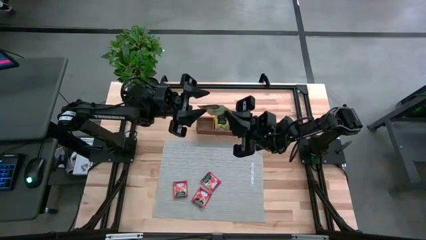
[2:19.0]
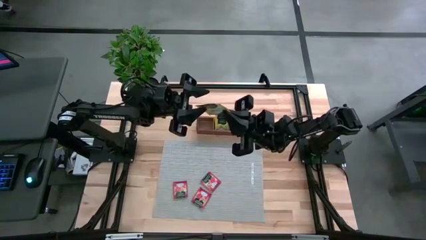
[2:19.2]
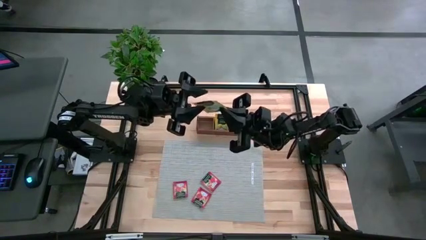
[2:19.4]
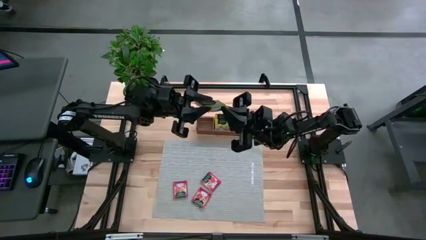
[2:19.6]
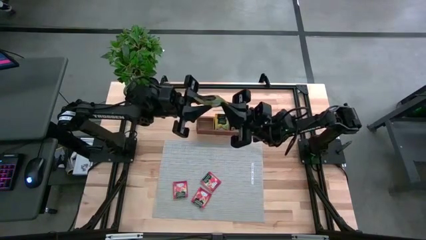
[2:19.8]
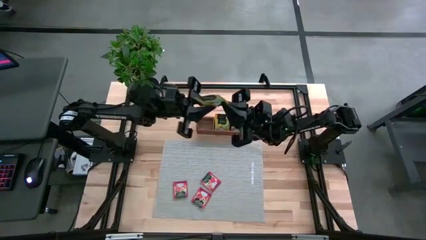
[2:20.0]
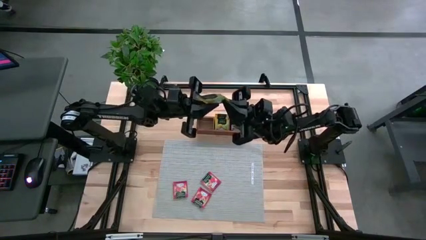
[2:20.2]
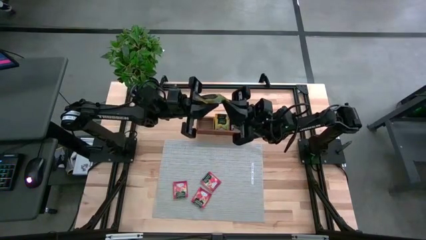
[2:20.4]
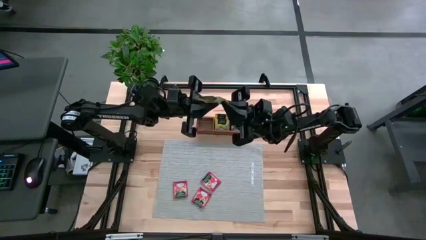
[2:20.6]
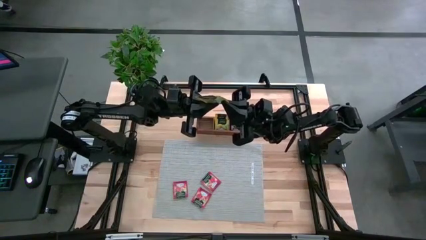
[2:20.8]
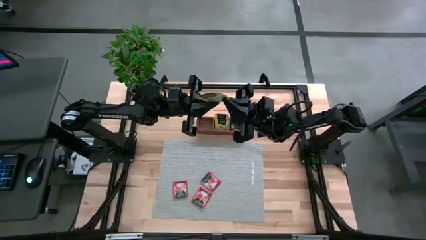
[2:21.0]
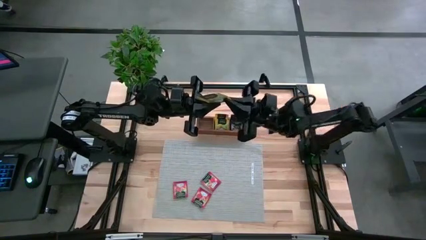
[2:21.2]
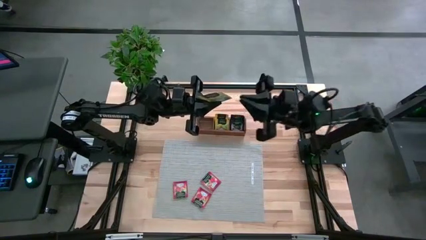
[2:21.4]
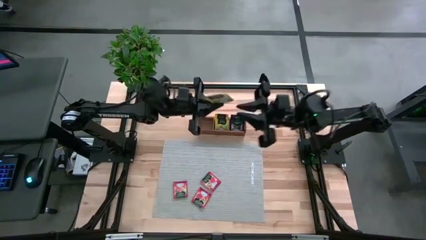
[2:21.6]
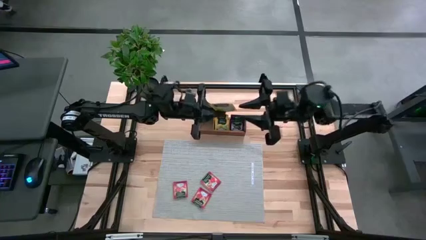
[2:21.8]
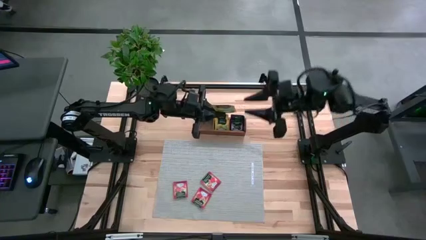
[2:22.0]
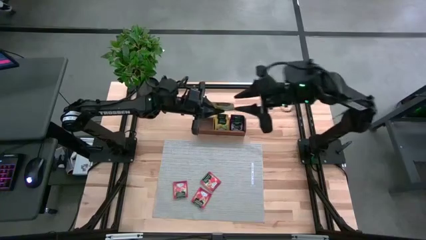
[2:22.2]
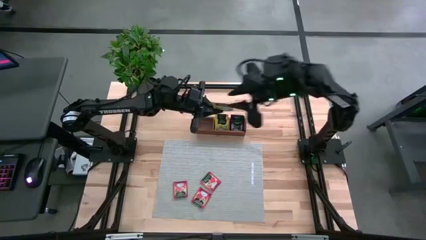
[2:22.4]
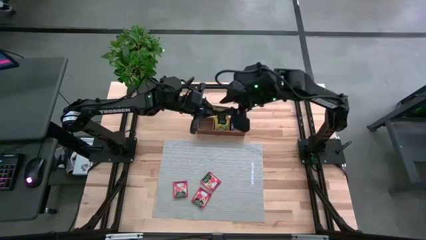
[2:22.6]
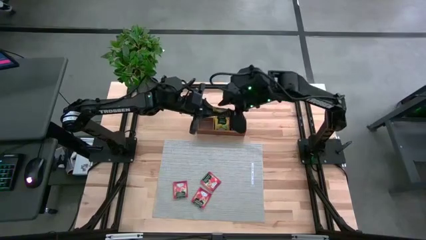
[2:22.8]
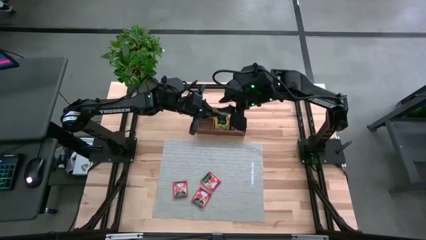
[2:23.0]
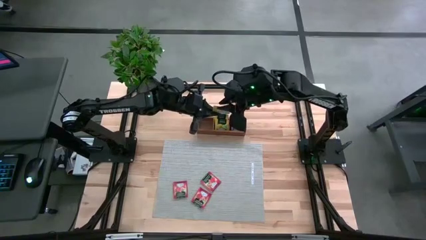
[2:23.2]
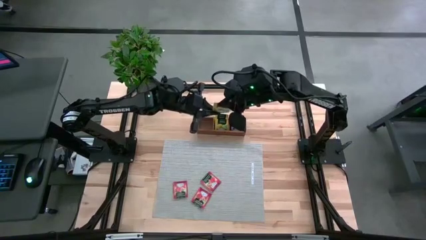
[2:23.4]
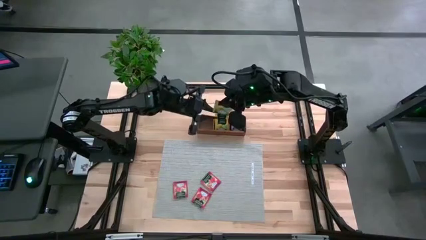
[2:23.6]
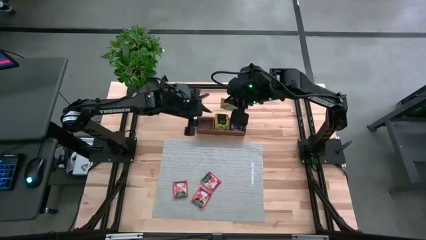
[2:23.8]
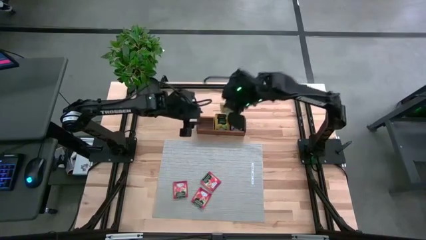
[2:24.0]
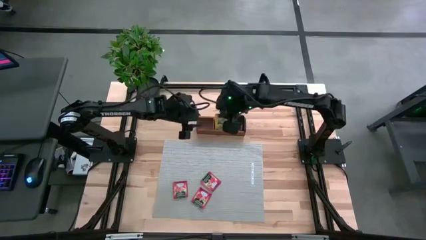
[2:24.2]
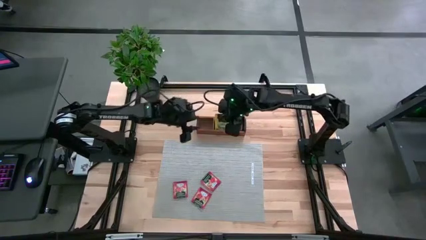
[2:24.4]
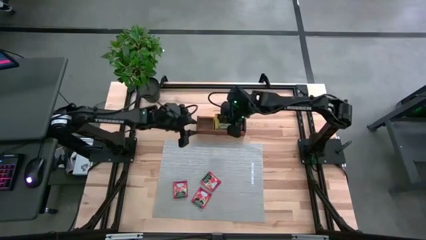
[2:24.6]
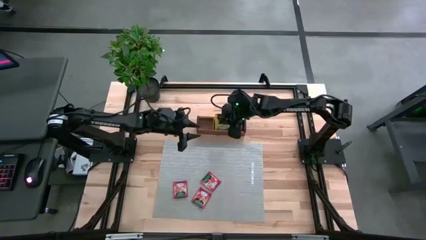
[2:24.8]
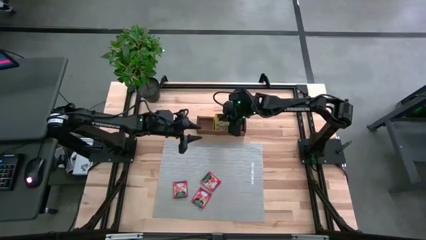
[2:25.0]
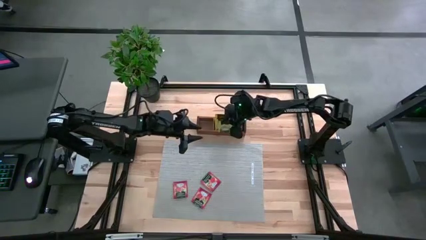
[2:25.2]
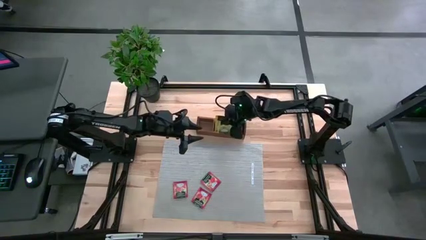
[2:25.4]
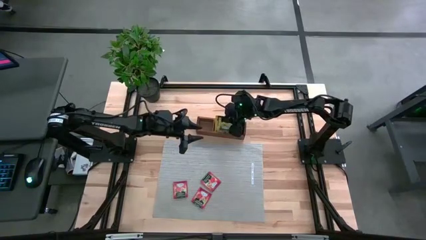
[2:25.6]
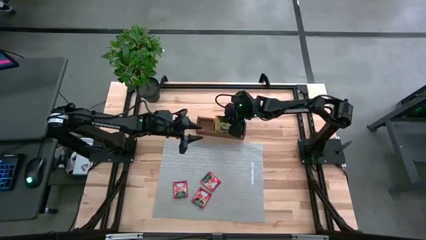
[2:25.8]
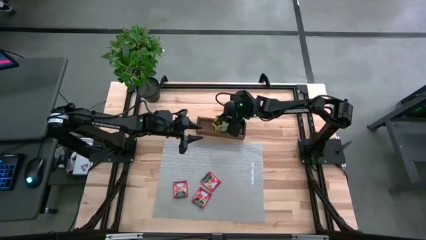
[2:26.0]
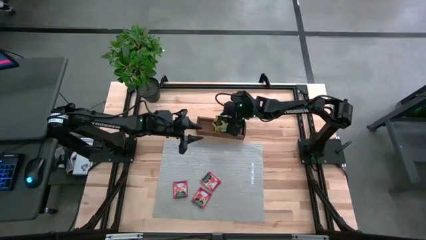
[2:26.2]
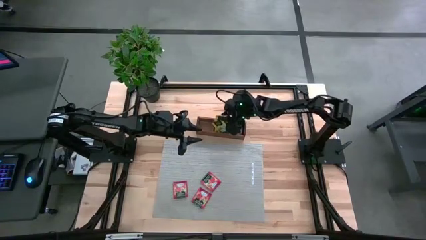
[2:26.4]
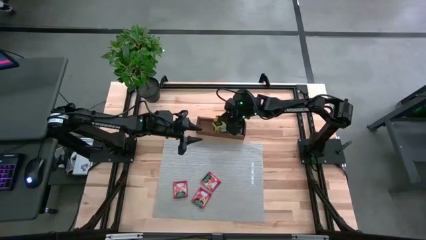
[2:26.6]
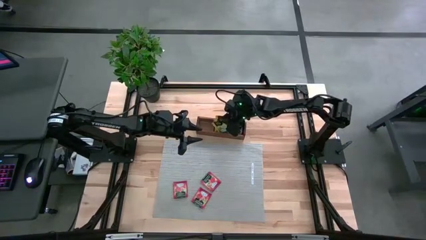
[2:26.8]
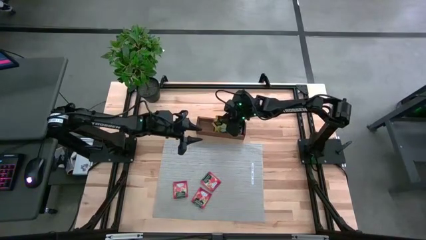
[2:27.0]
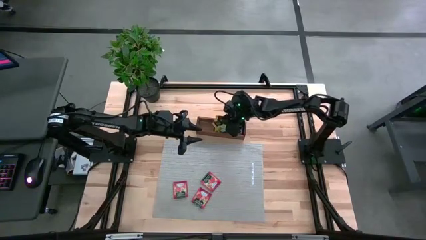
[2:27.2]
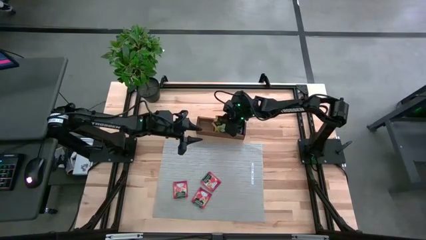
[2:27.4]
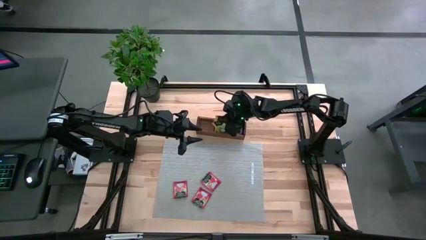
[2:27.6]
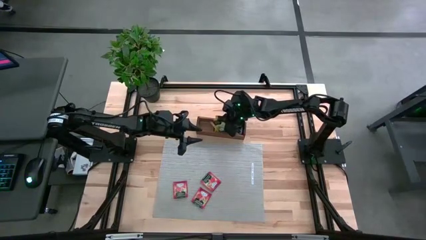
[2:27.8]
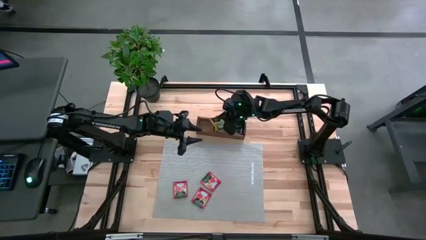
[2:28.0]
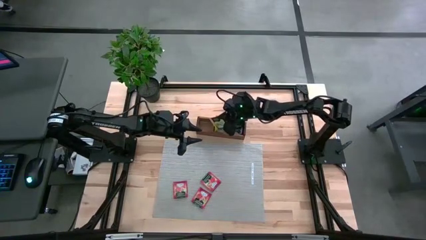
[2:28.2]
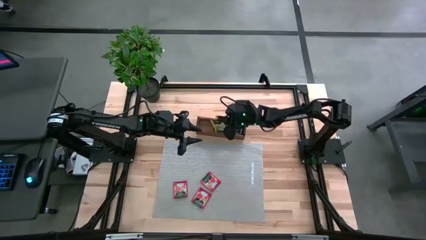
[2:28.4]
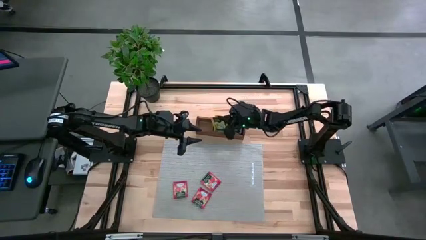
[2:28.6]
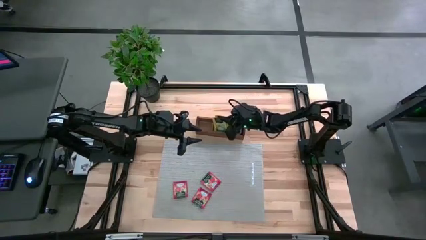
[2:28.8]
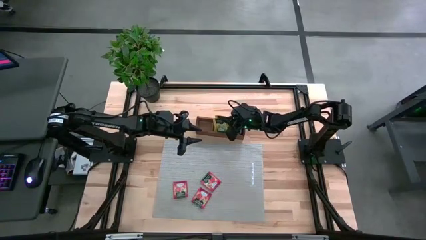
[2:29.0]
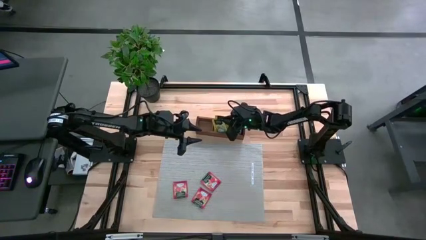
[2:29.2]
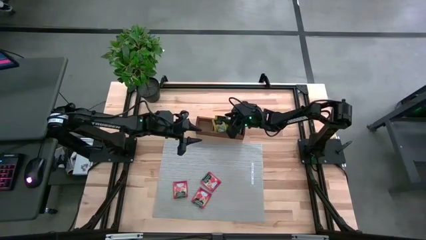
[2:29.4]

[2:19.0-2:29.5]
Task: Pick & Place Tea
Put the yellow tea bag into the middle section of the wooden organizer

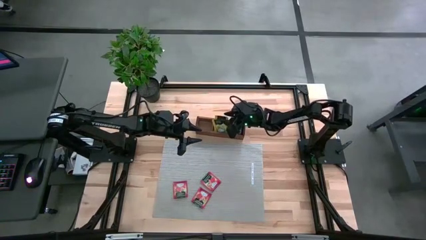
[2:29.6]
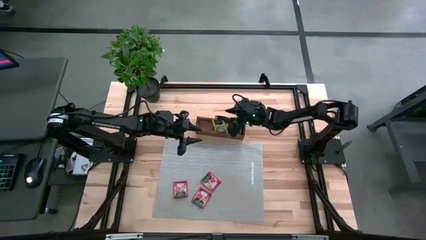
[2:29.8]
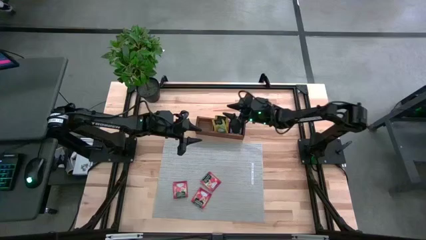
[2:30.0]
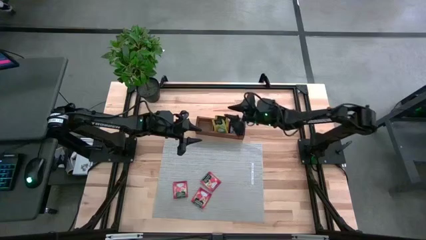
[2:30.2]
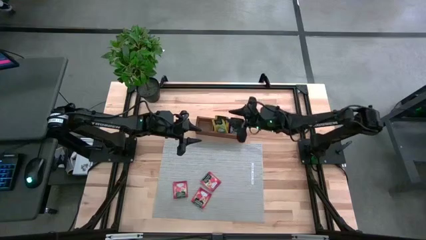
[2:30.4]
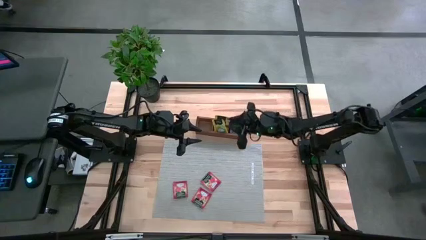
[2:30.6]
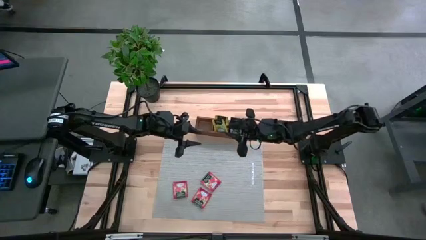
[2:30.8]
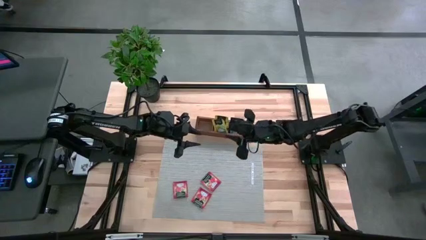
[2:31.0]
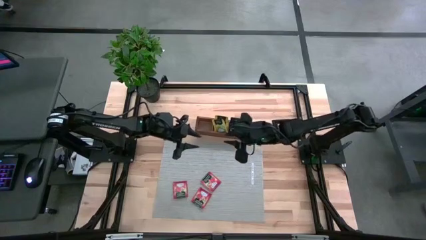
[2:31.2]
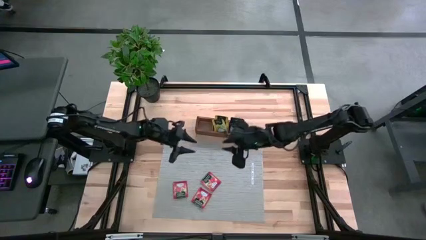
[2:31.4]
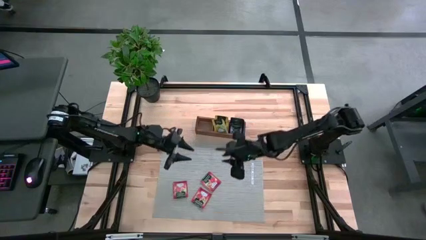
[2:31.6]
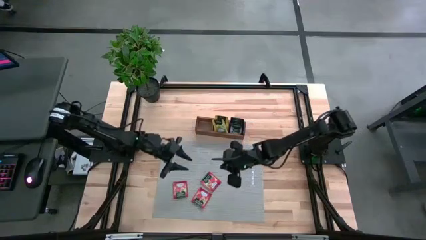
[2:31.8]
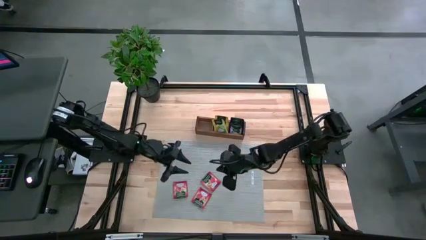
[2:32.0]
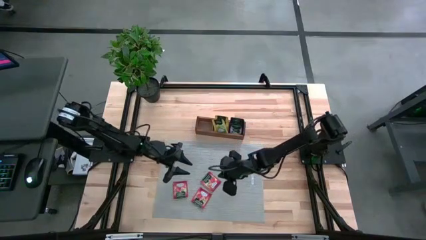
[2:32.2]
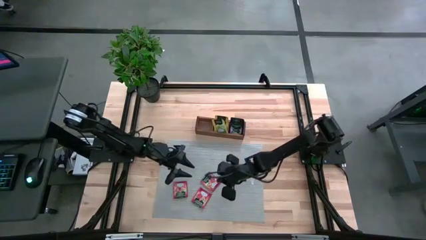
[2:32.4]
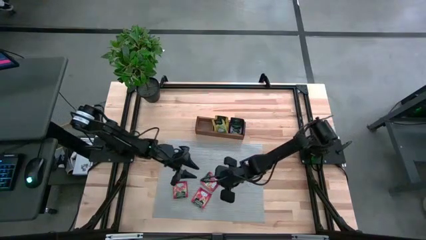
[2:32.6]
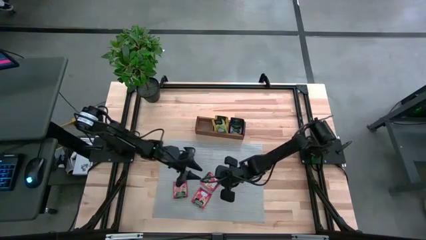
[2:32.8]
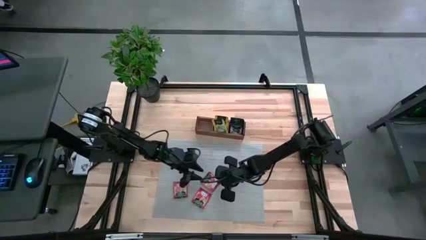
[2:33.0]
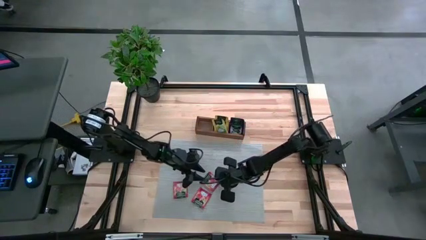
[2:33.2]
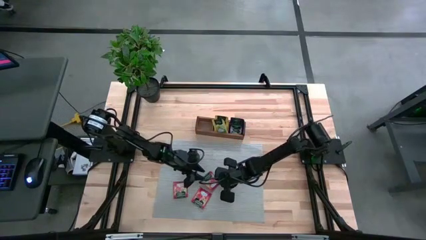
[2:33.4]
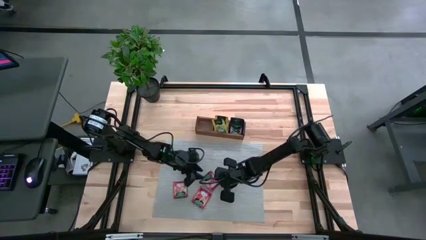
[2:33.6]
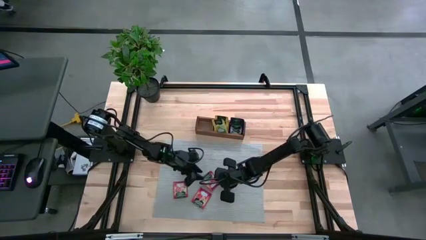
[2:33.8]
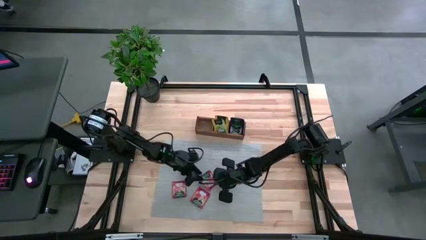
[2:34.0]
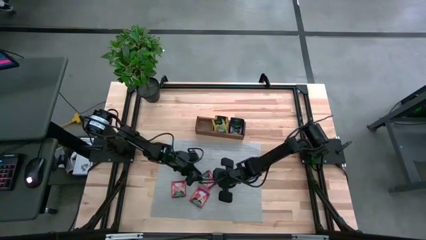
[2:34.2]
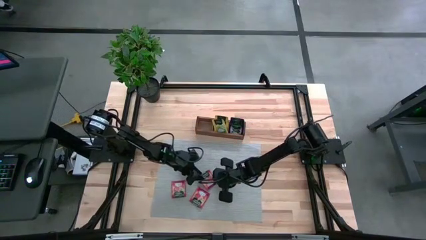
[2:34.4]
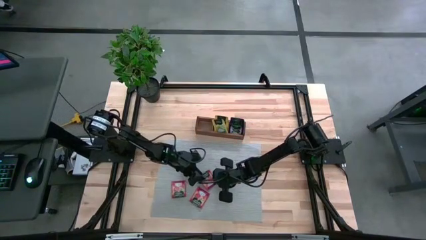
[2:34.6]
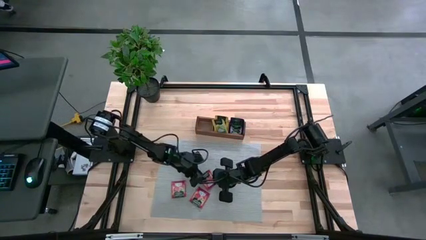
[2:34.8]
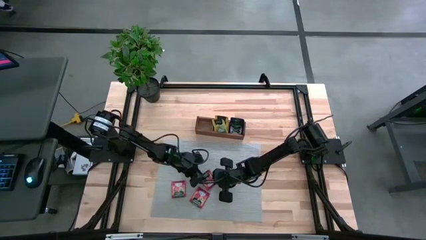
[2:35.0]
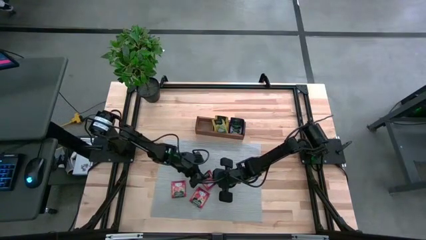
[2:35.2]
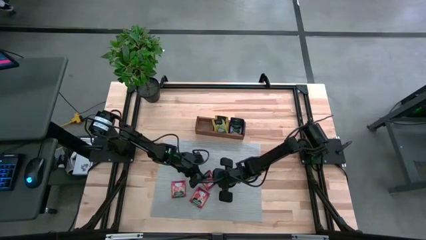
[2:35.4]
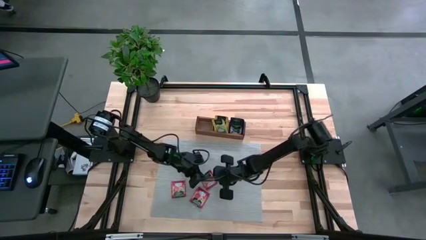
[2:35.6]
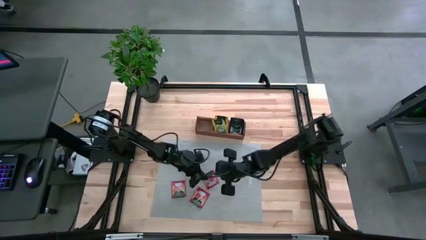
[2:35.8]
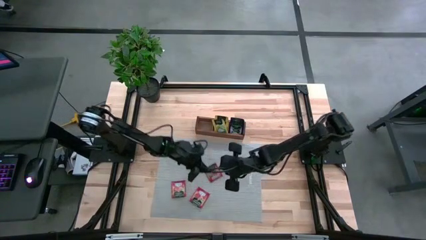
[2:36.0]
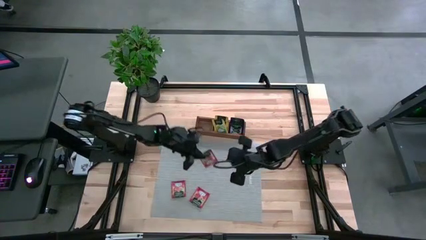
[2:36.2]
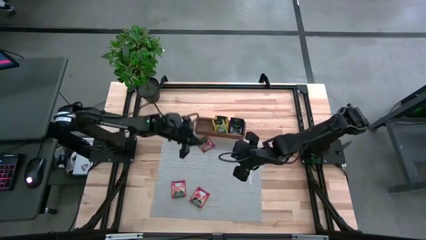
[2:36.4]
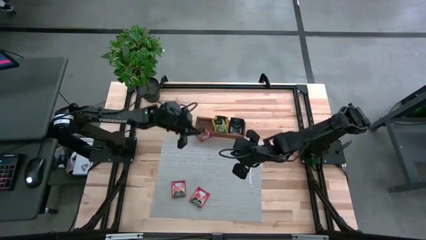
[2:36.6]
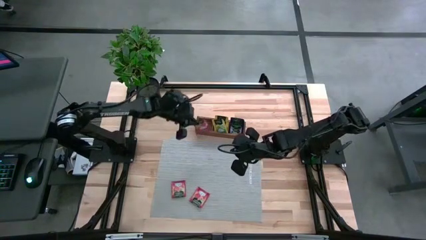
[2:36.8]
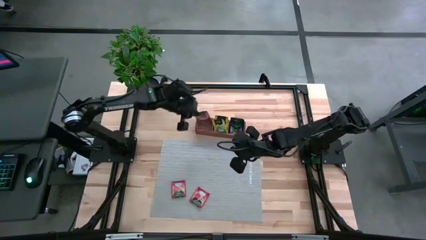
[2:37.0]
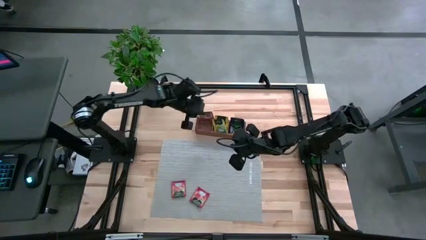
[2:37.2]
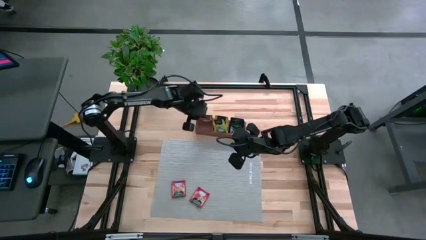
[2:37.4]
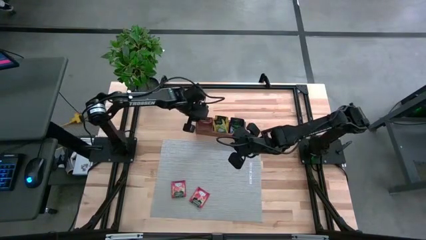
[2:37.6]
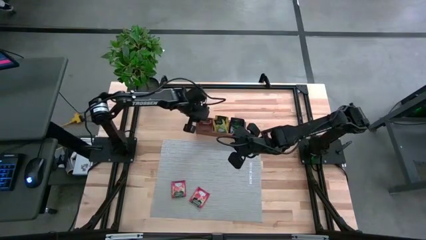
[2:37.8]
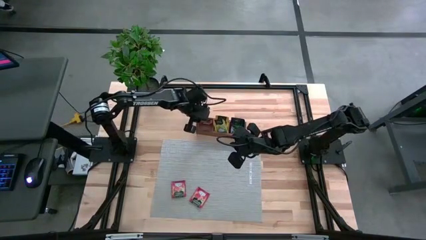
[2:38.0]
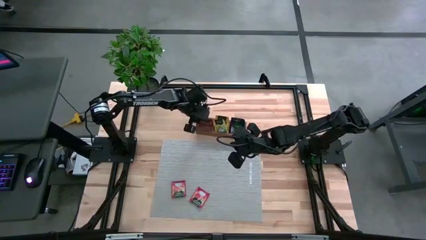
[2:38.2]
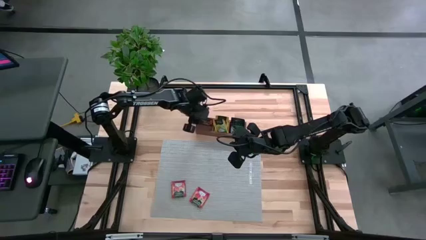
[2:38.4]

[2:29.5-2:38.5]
Put the red tea bag into the left section of the wooden organizer
